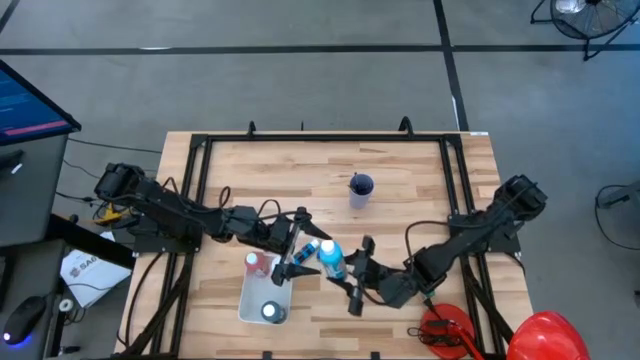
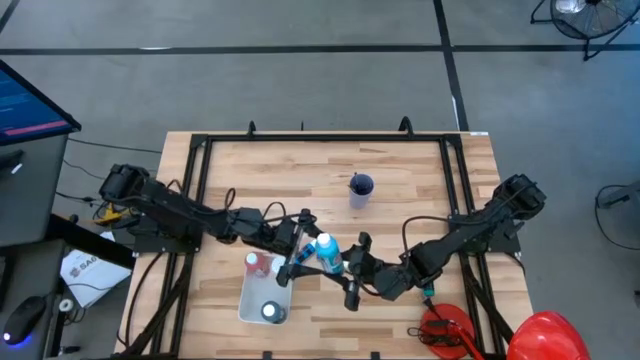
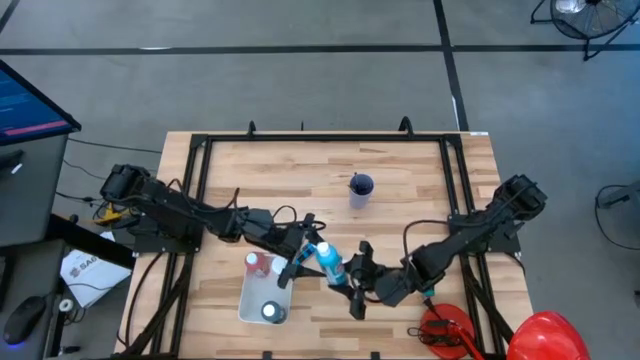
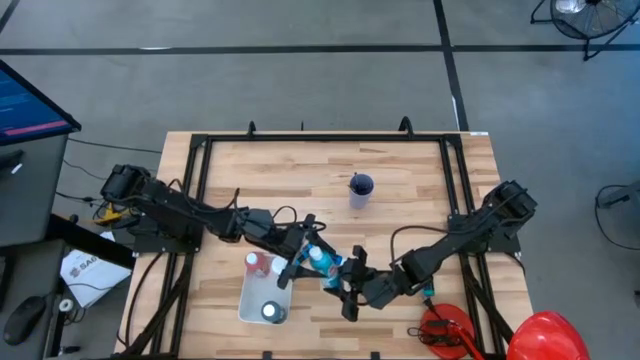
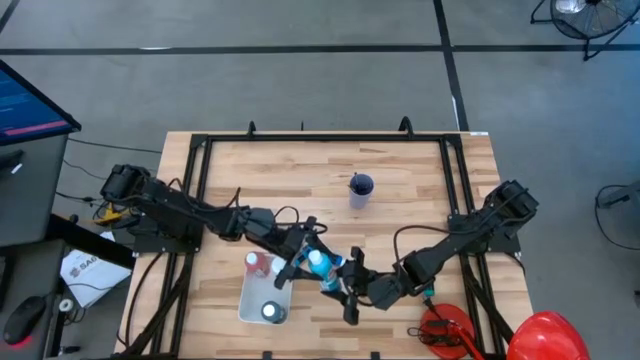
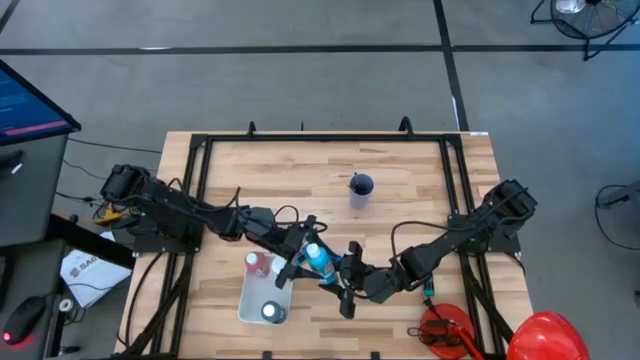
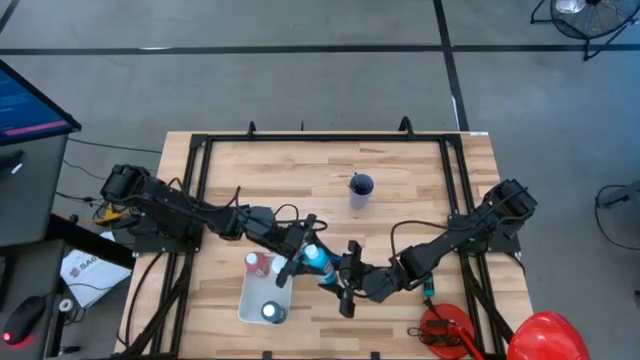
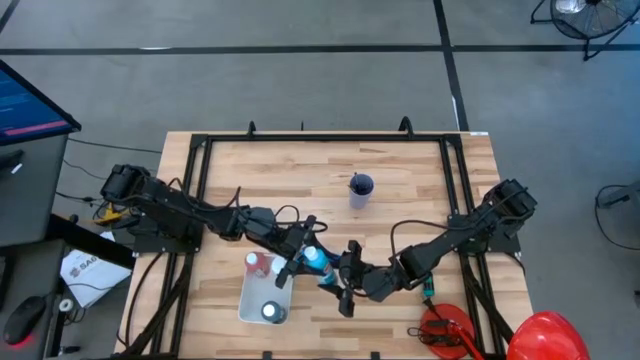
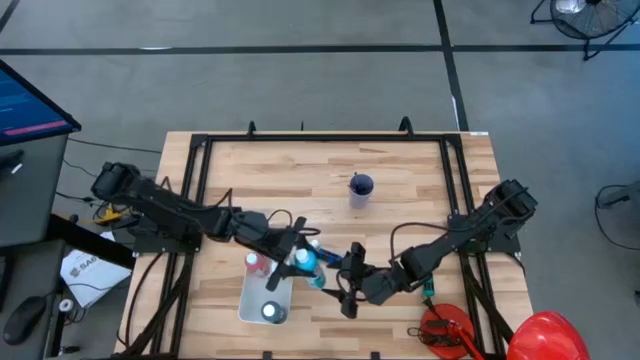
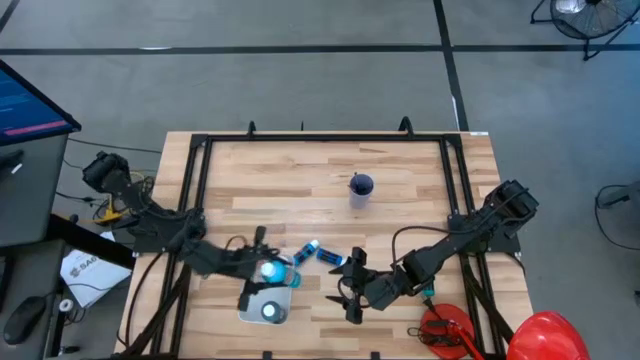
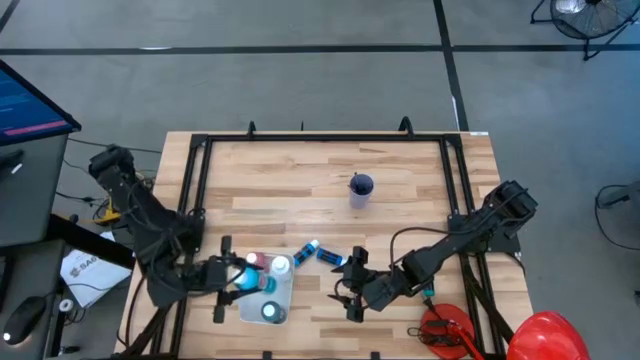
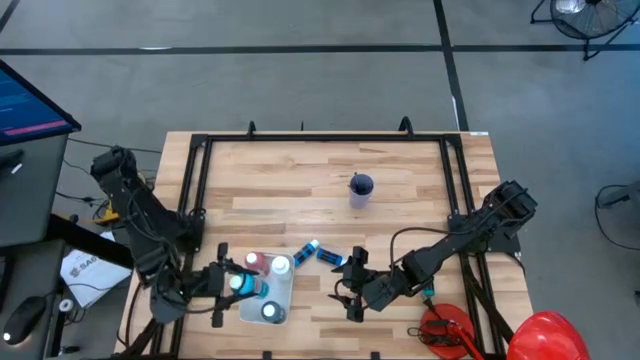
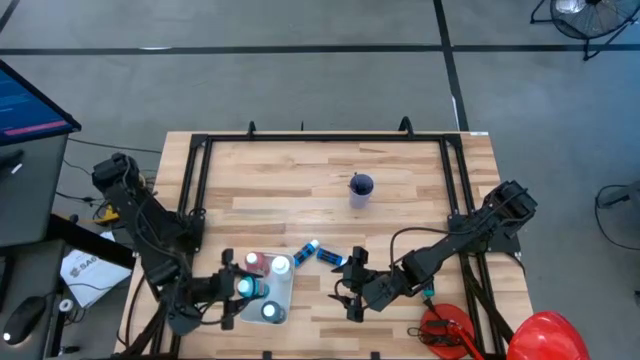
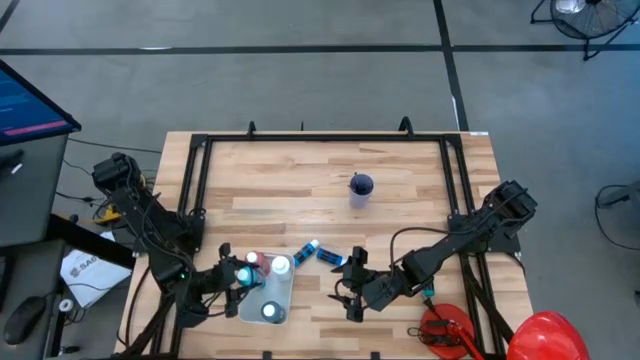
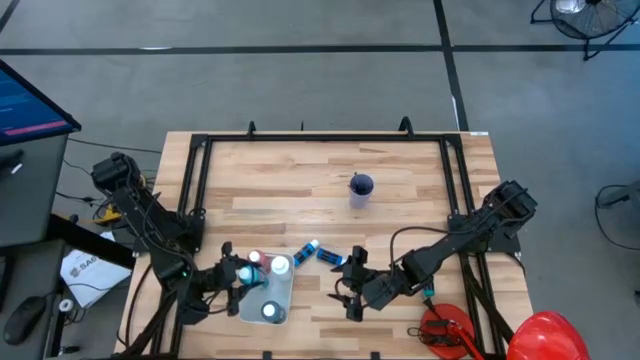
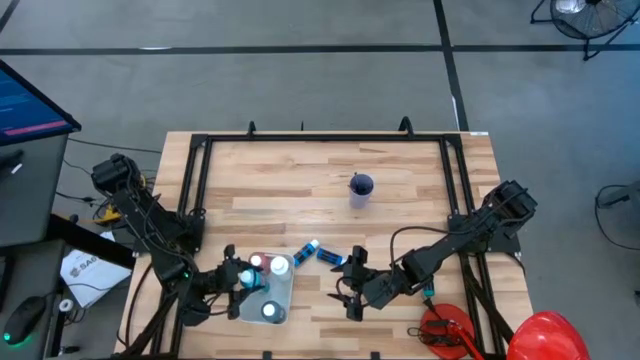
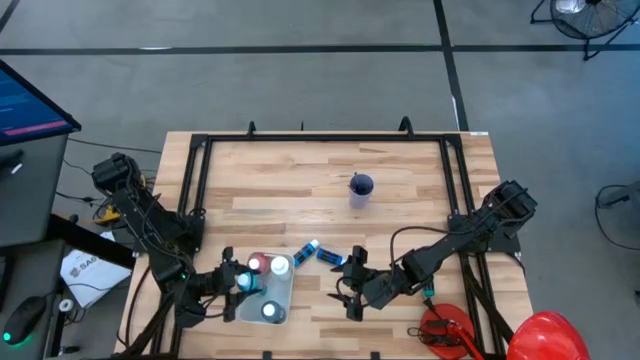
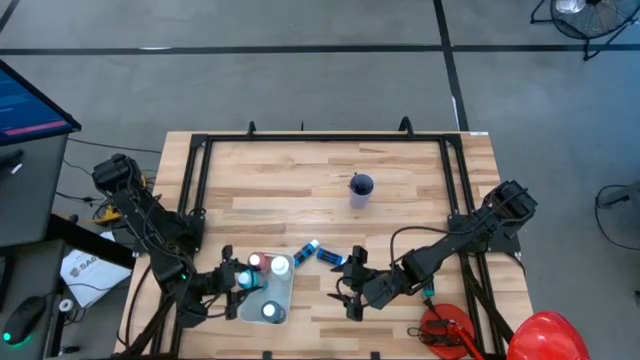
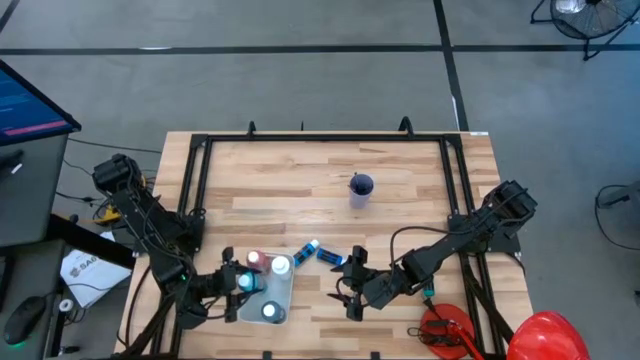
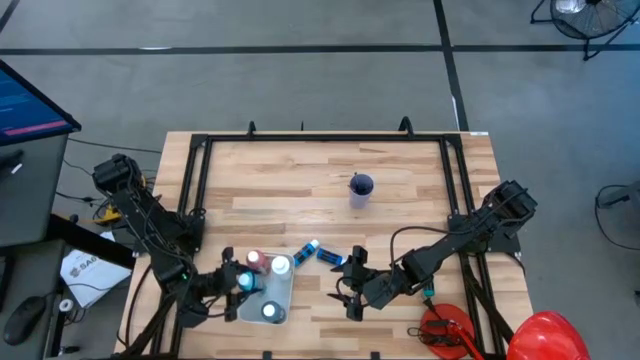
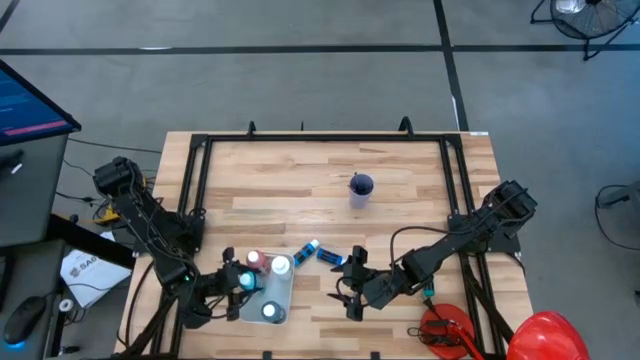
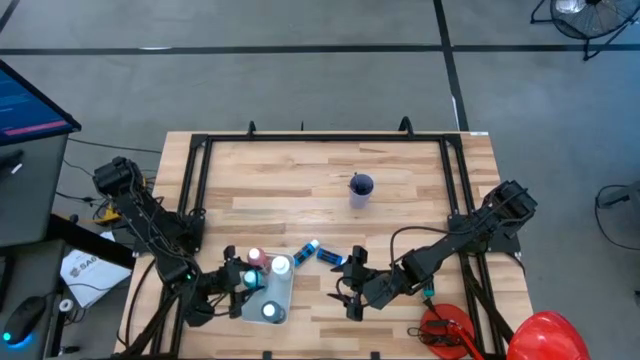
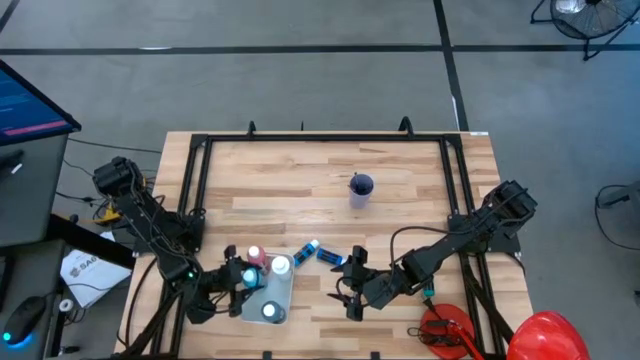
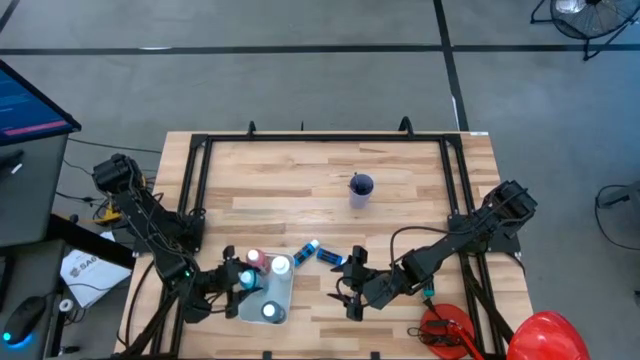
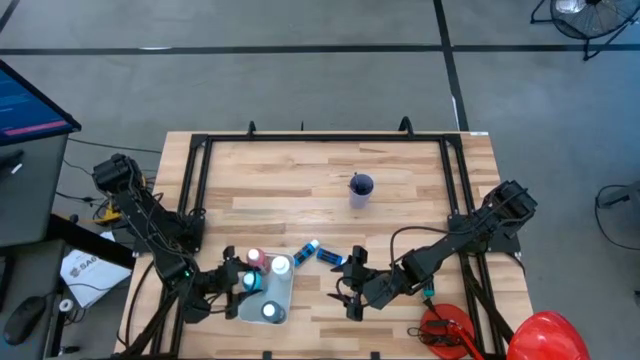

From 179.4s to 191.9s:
Task: Pick & Place Paint Supplies
Put the light blue paint bottle into the white bin

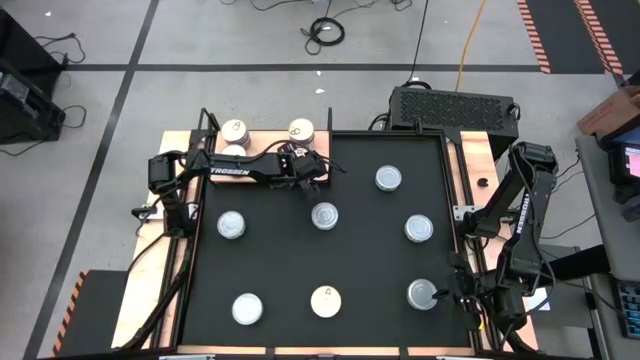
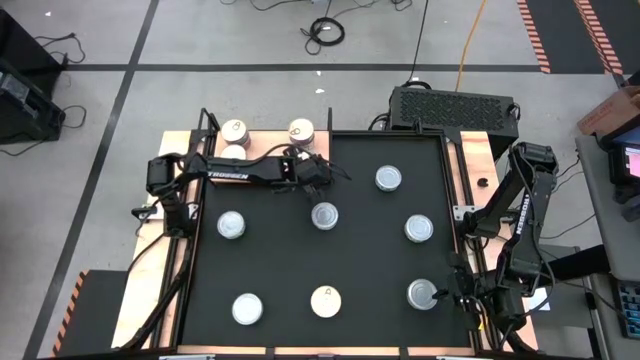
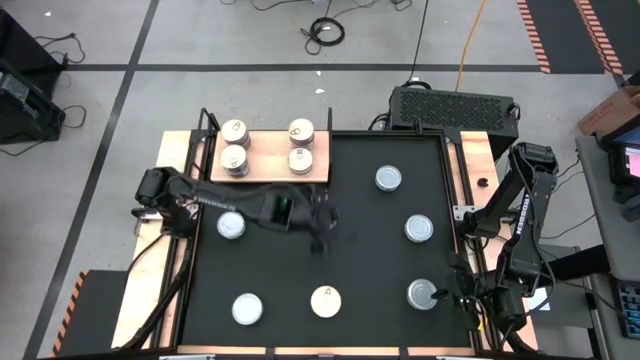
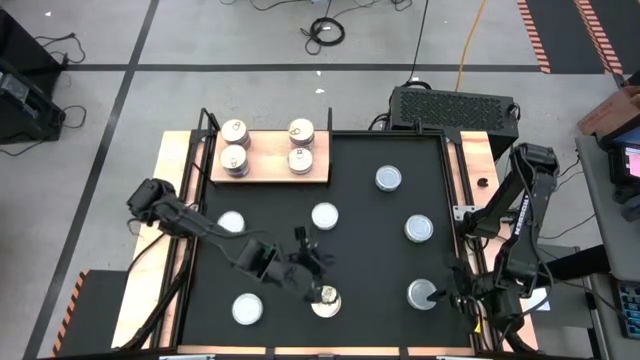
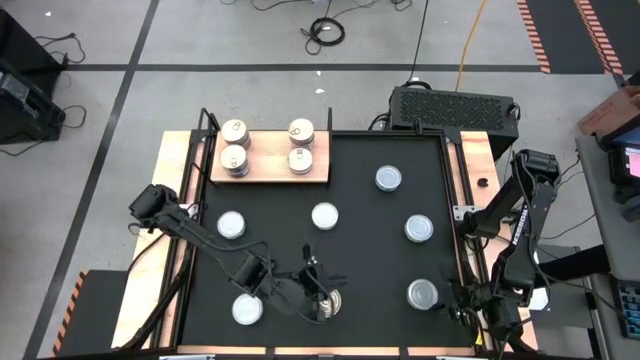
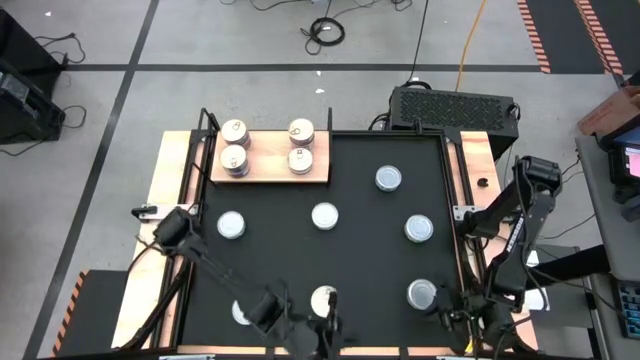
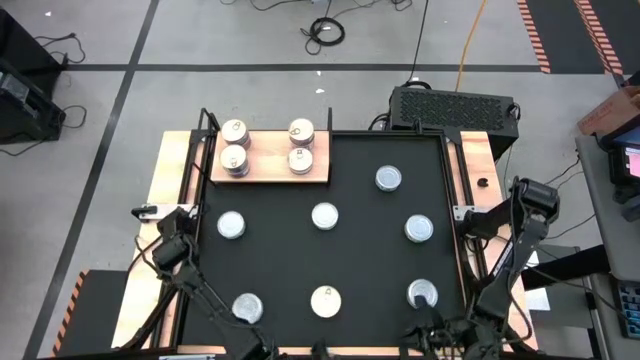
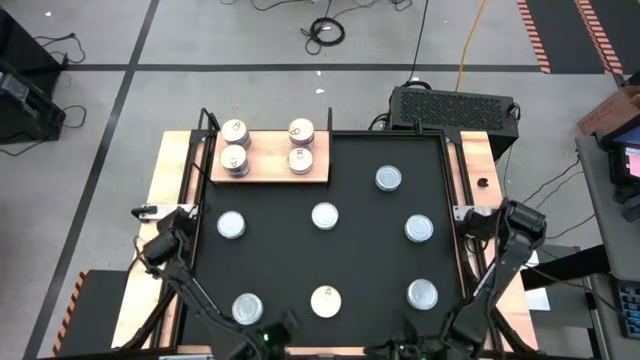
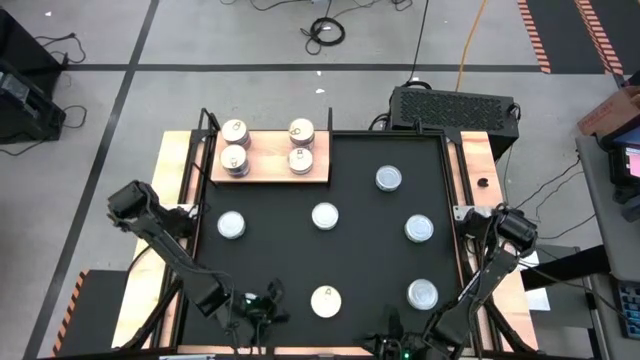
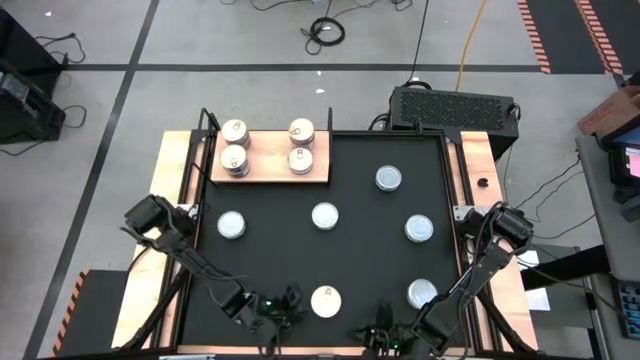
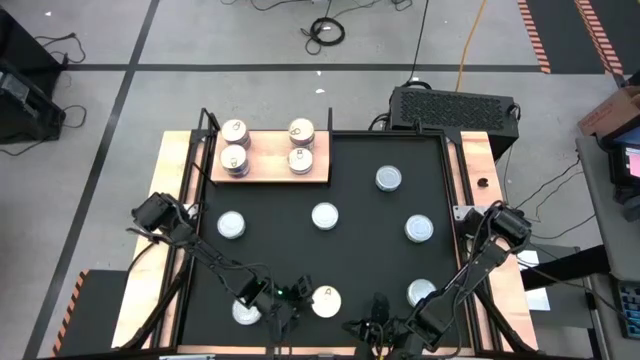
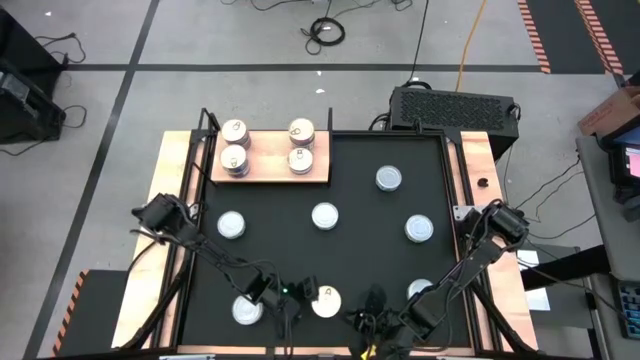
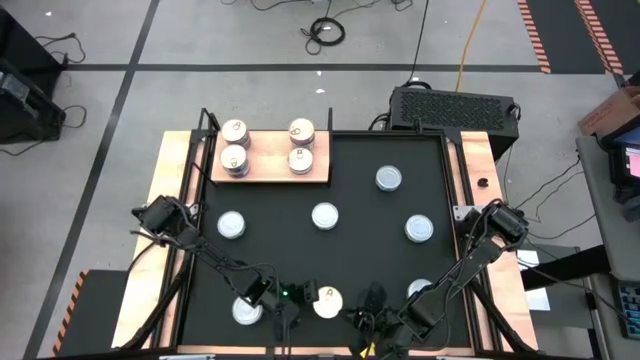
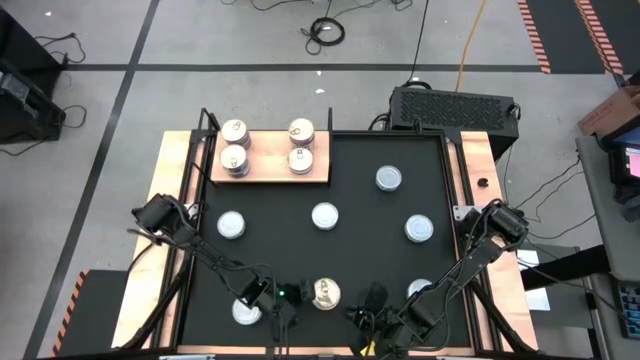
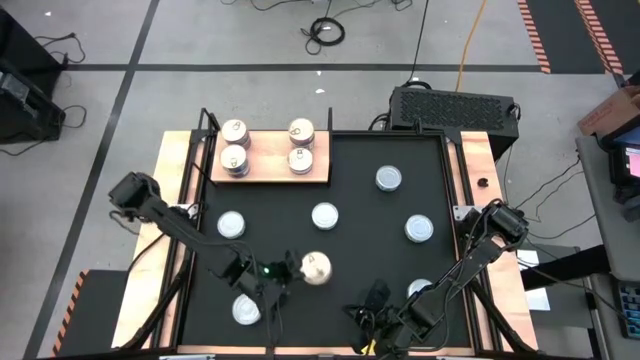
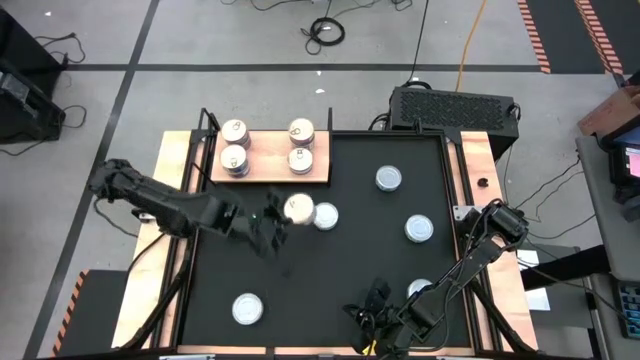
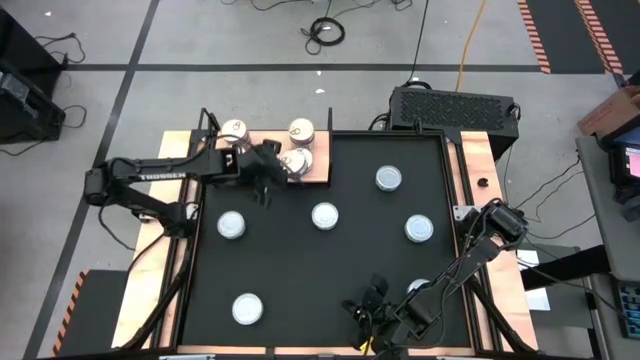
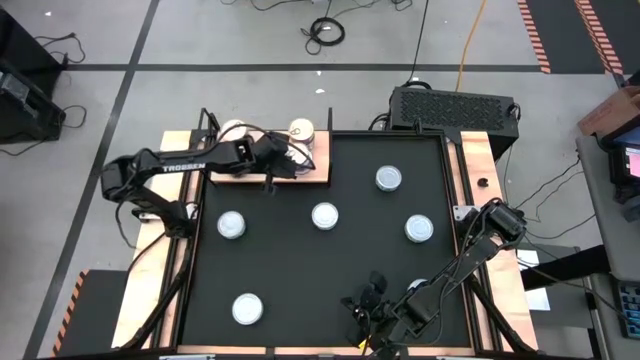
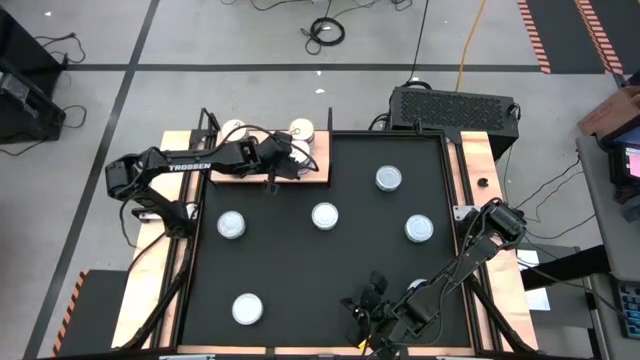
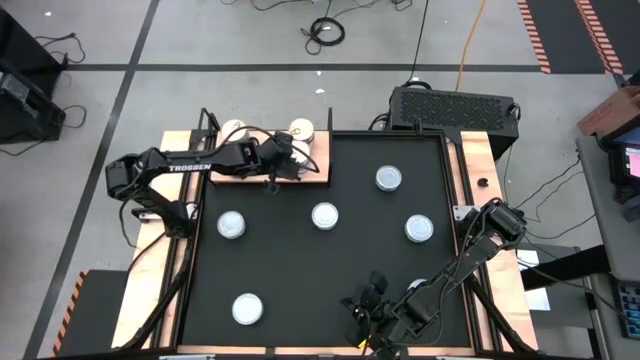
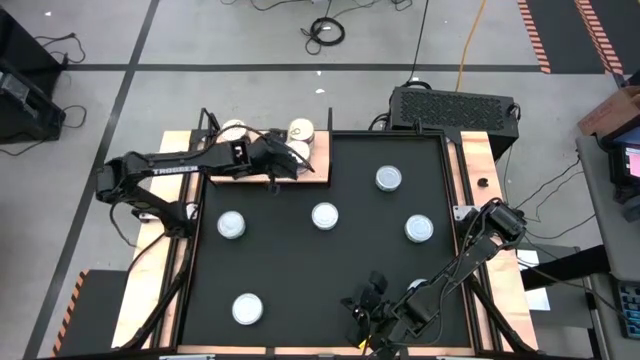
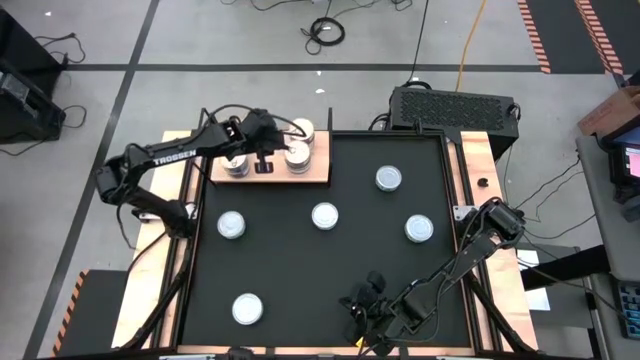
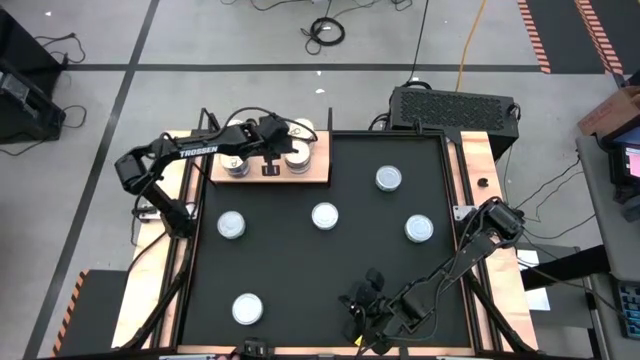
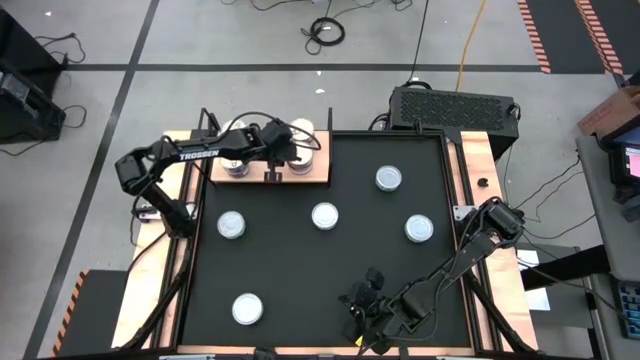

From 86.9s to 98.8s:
Task: Stack canned seafood by type on shelf
Stack the blue tuna can on top of the blue tuna can on the shelf
